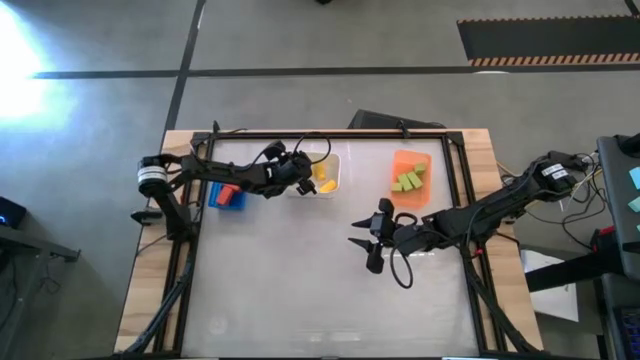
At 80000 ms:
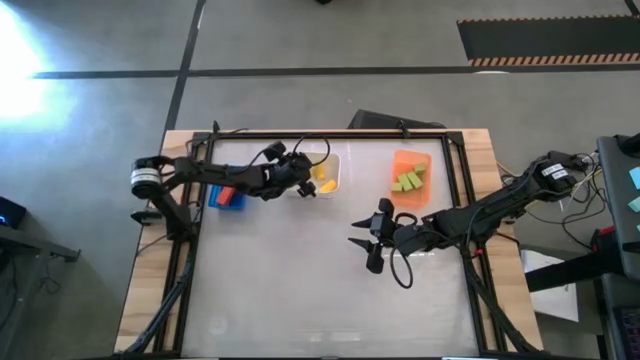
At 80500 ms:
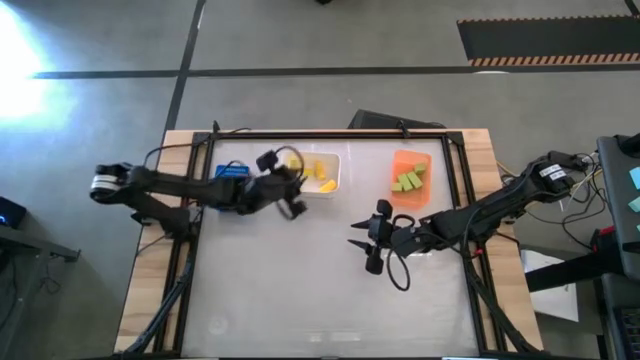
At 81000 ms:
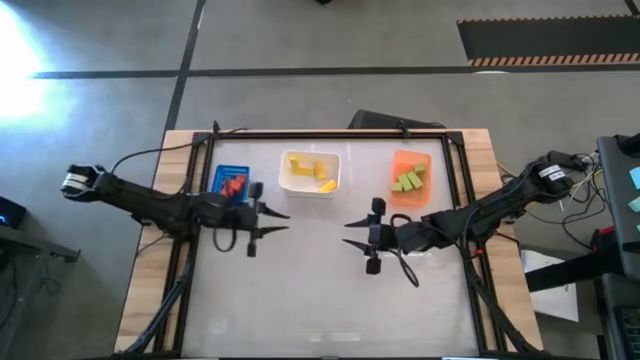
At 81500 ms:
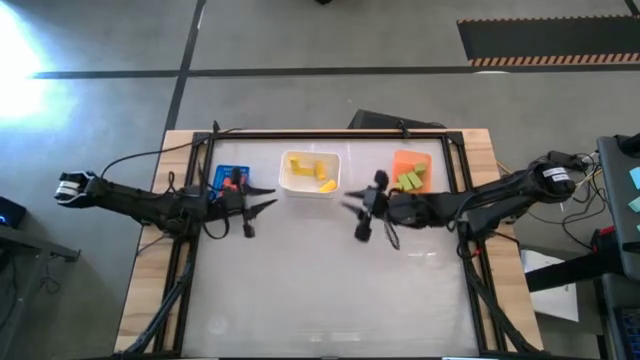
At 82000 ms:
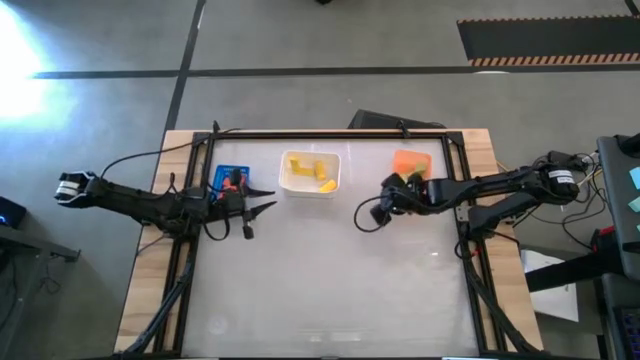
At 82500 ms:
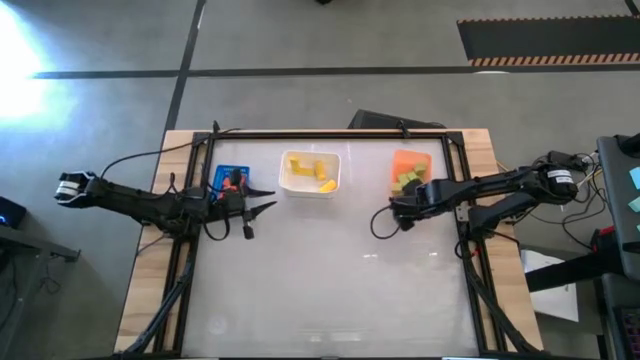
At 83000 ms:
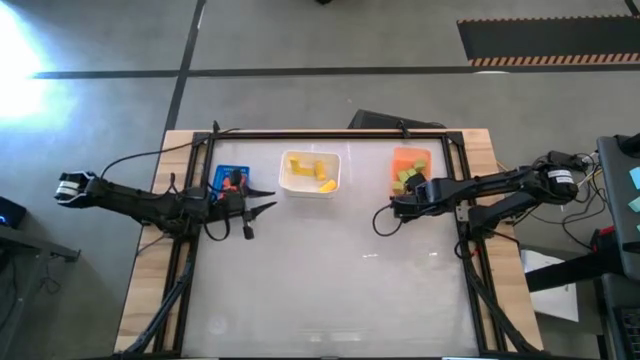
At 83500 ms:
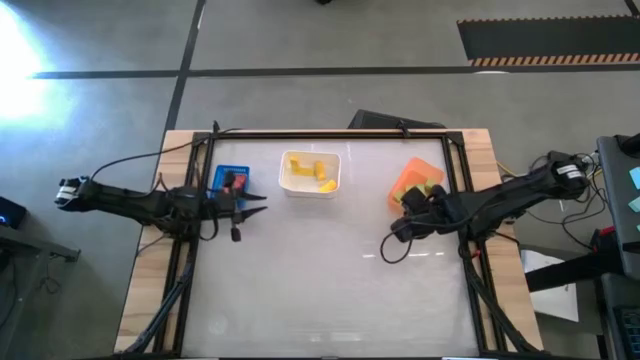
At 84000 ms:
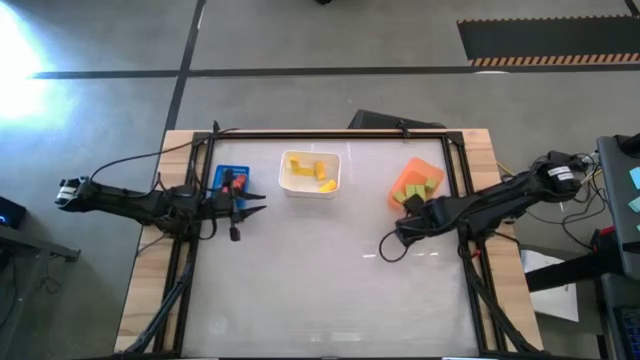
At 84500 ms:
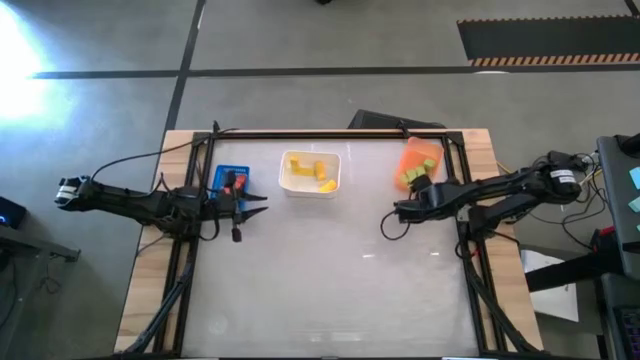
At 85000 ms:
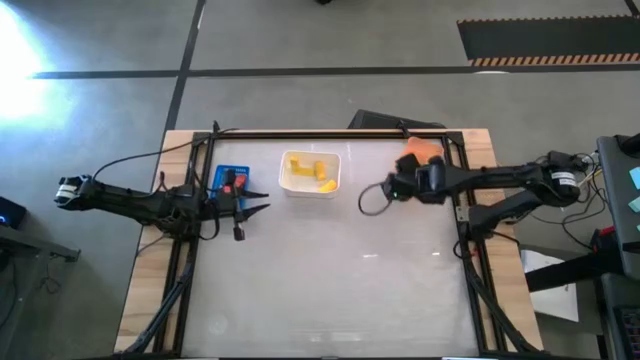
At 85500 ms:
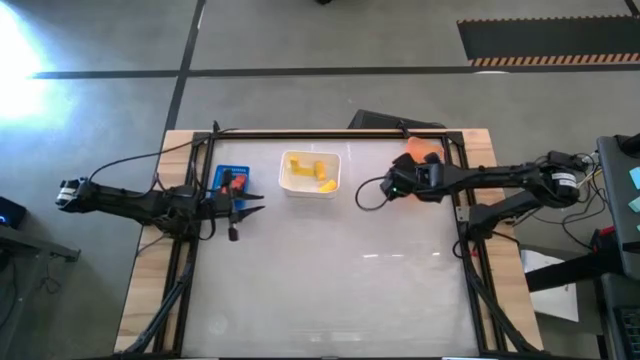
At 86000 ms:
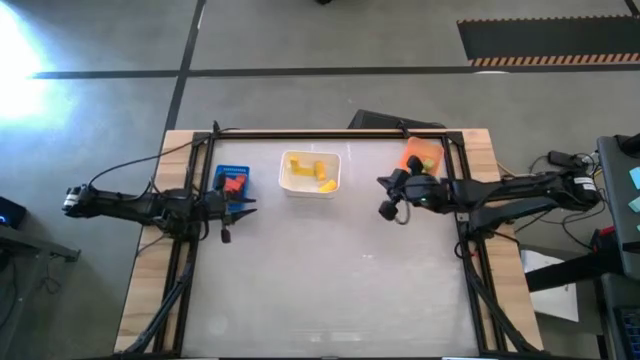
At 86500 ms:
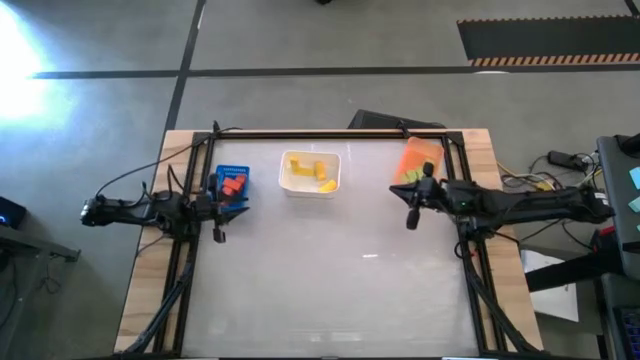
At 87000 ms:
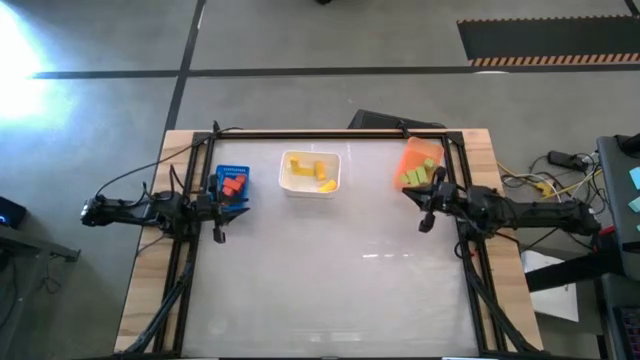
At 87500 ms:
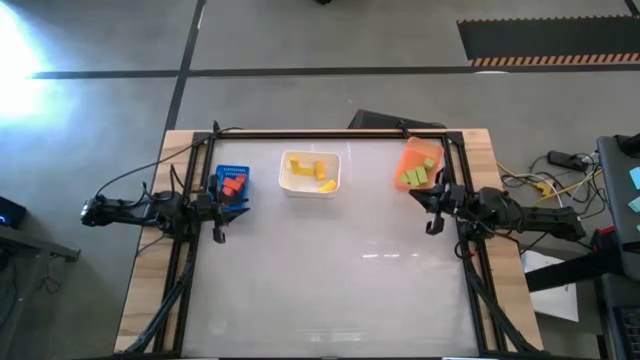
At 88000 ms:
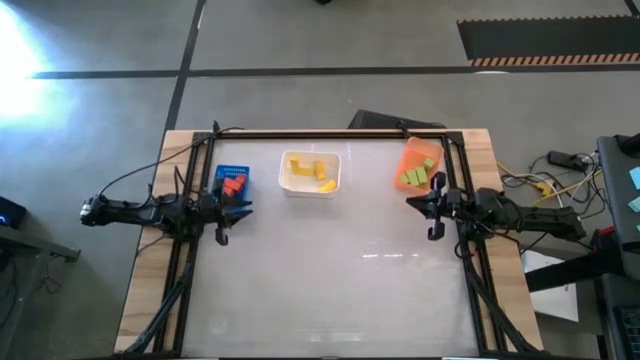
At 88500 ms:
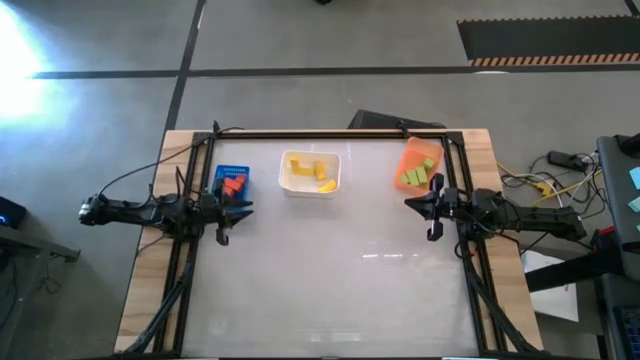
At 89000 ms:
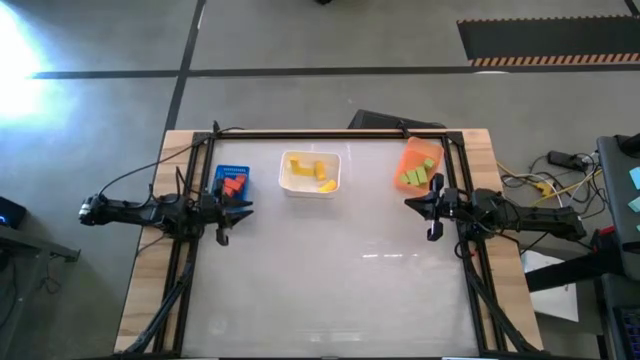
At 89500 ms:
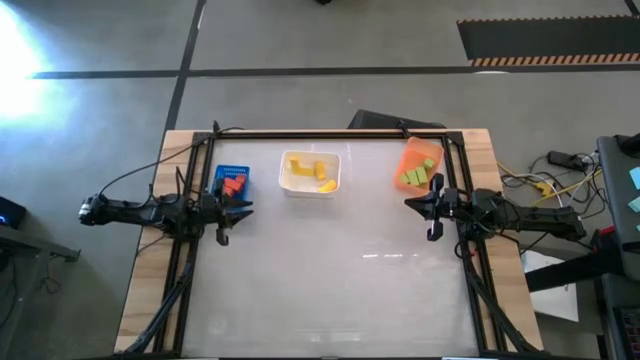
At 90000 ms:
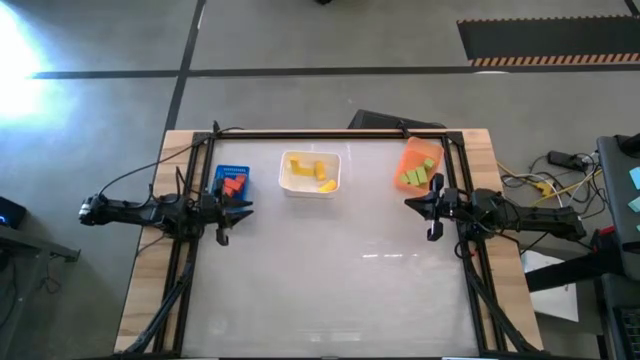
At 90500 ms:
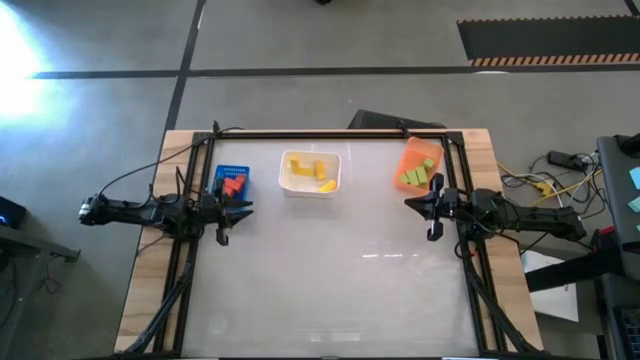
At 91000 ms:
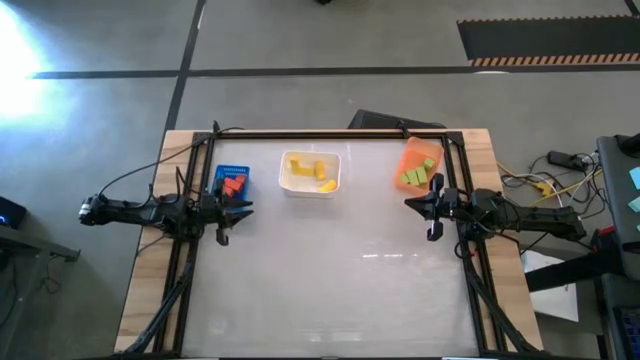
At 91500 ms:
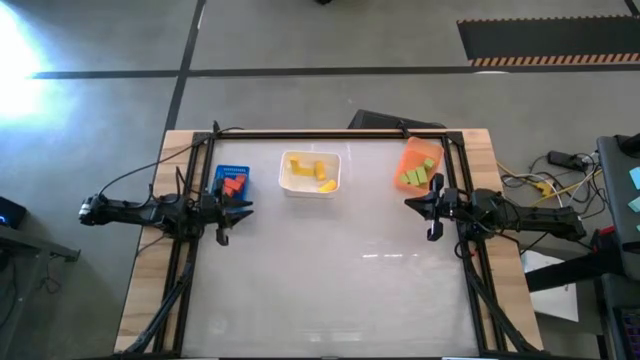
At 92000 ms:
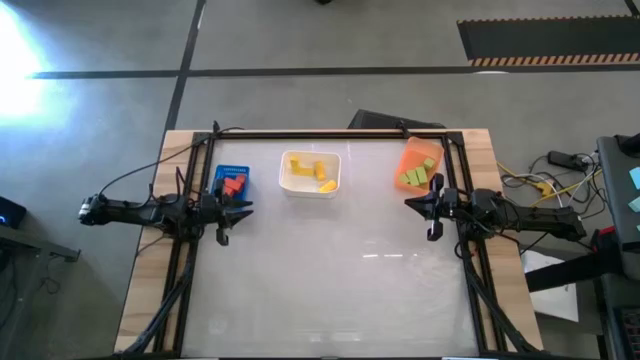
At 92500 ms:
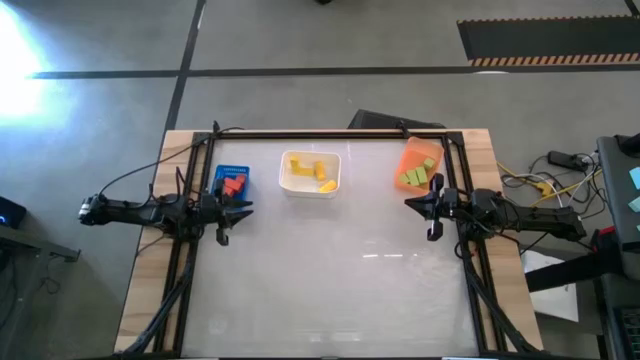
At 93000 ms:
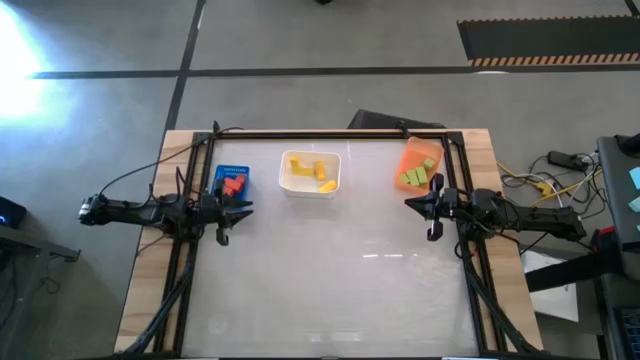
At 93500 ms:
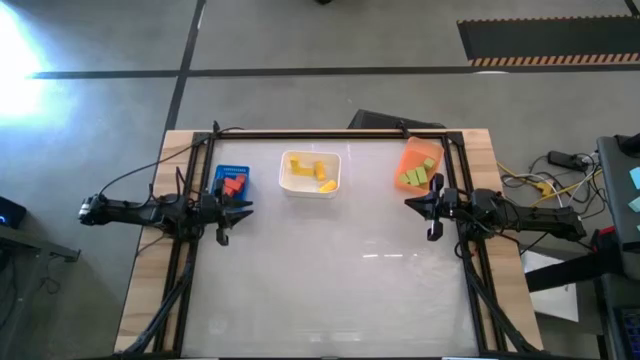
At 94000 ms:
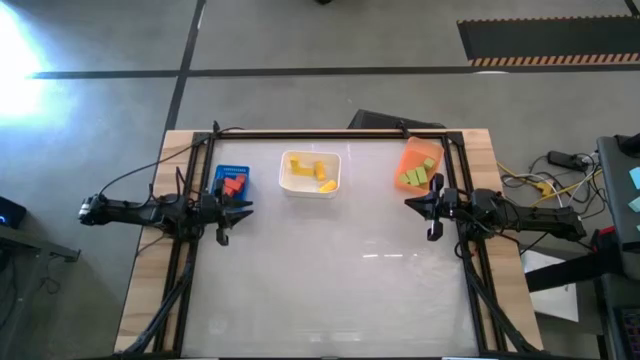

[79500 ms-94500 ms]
Task: Sort & place blocks by color
Return to Home Position

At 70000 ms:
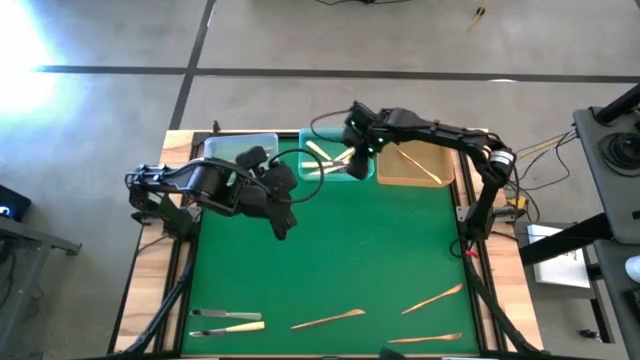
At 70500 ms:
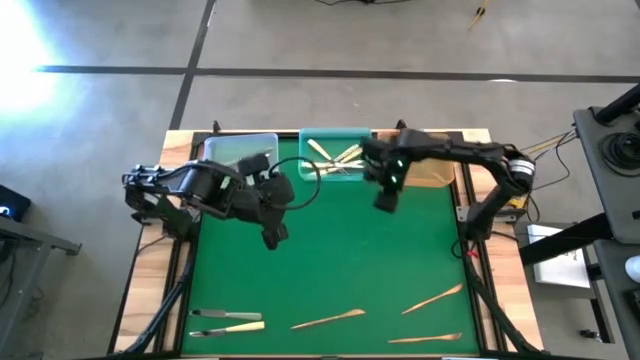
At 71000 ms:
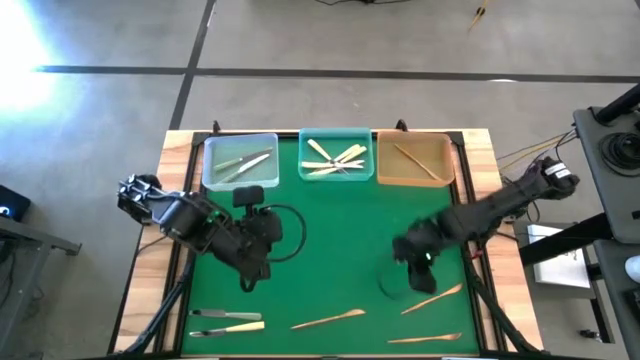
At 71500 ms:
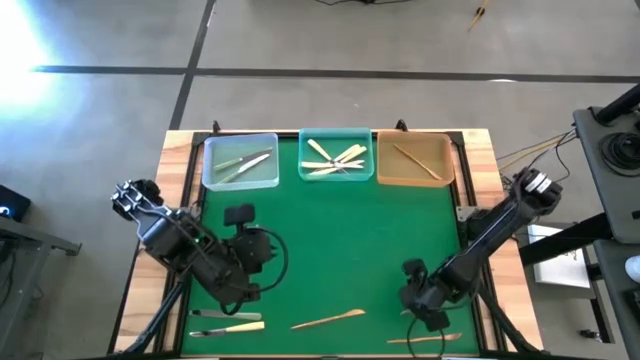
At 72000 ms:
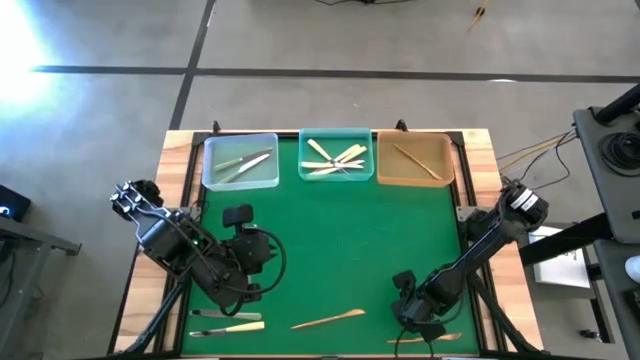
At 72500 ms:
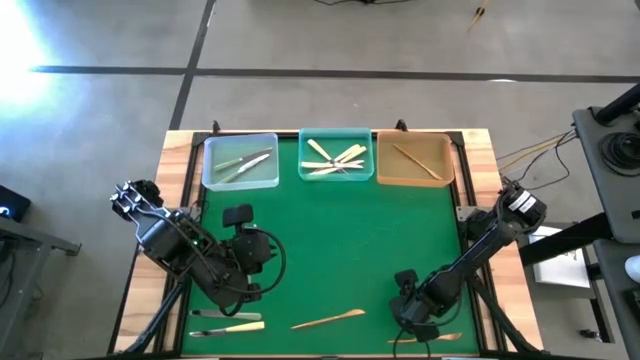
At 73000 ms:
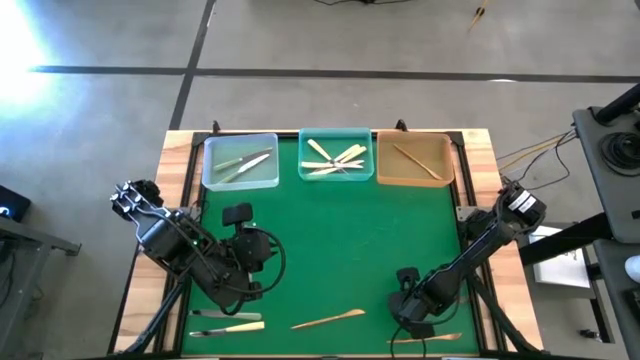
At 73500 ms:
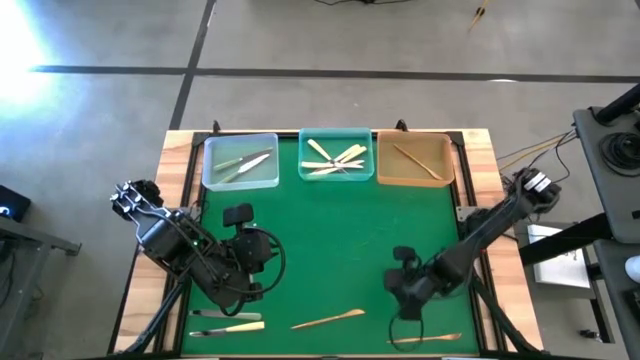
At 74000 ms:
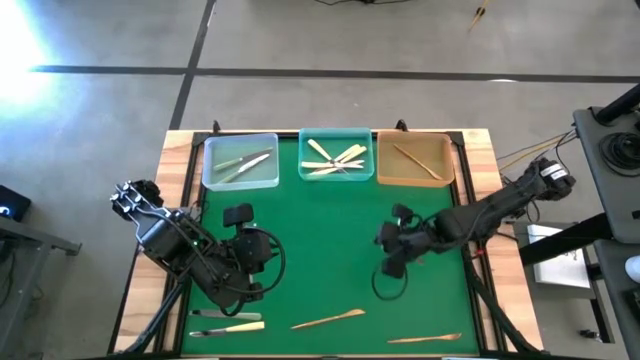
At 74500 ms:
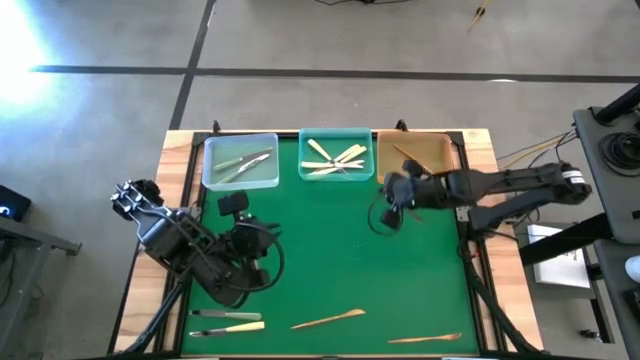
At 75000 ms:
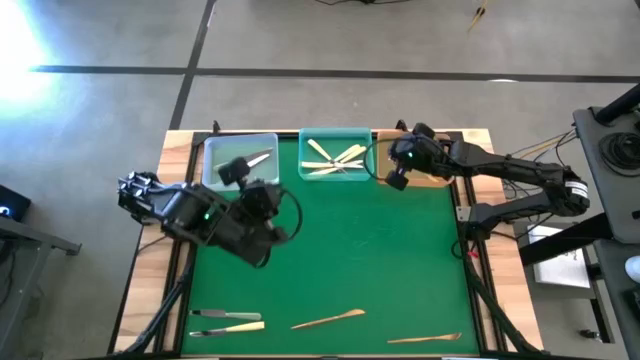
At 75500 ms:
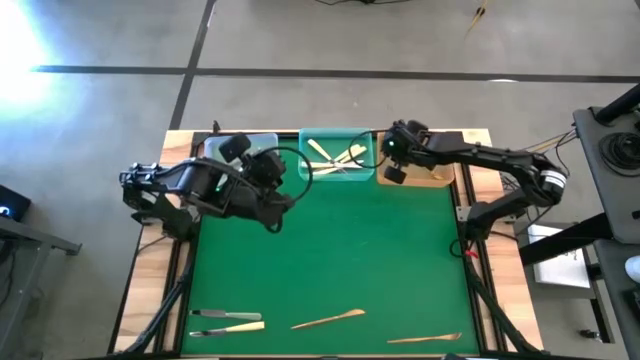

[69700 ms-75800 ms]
Task: Sort silverware by color (type)
Put the top right gold knife into the yellow bin
